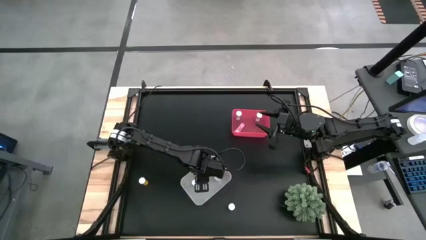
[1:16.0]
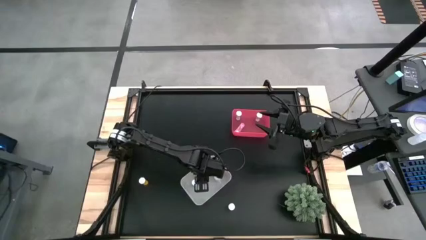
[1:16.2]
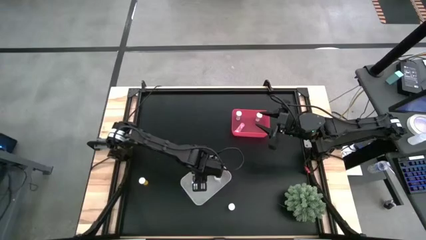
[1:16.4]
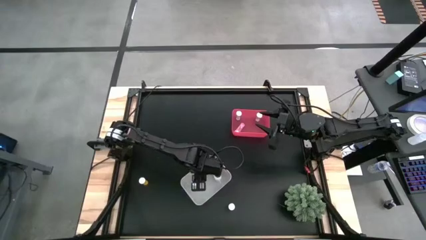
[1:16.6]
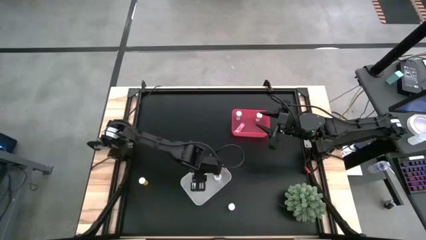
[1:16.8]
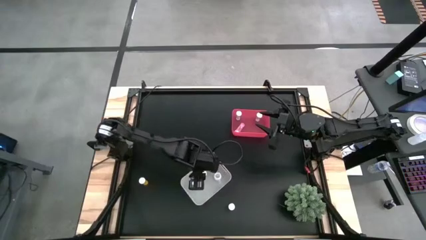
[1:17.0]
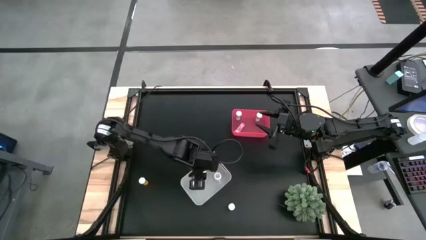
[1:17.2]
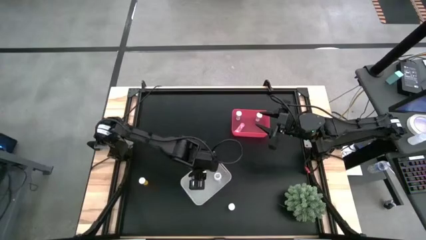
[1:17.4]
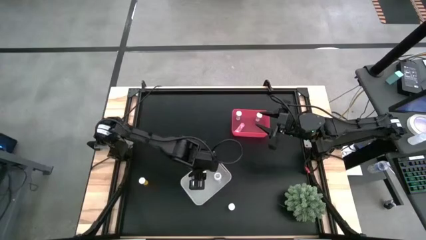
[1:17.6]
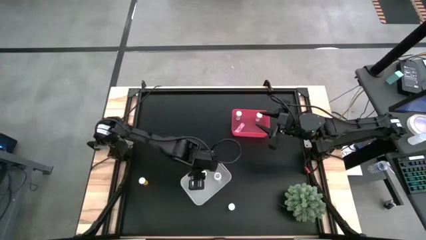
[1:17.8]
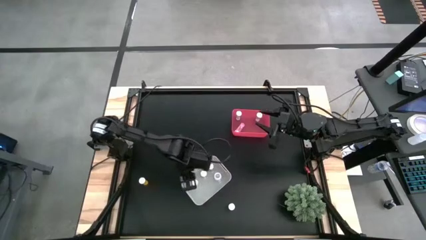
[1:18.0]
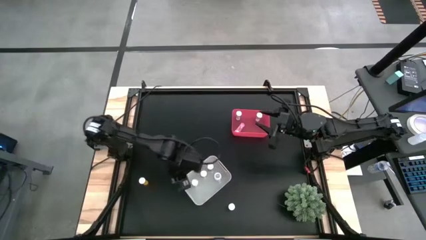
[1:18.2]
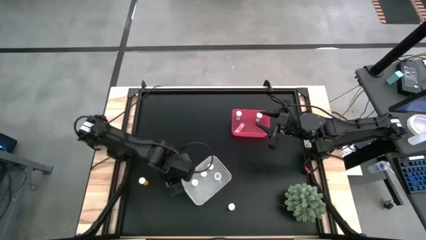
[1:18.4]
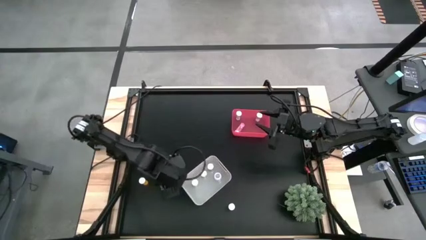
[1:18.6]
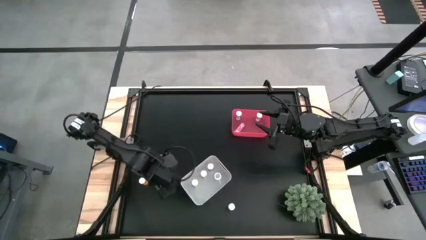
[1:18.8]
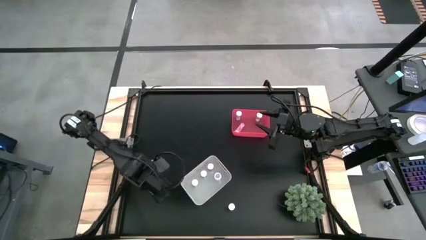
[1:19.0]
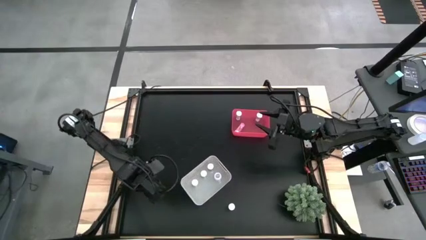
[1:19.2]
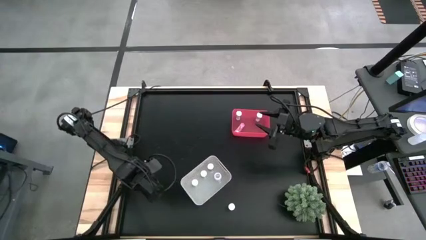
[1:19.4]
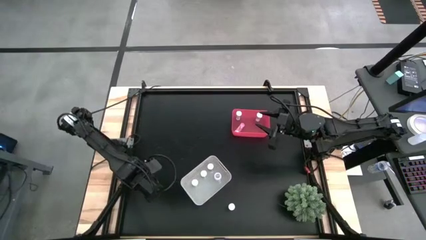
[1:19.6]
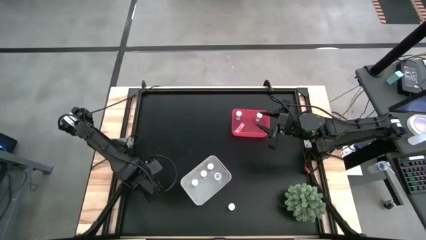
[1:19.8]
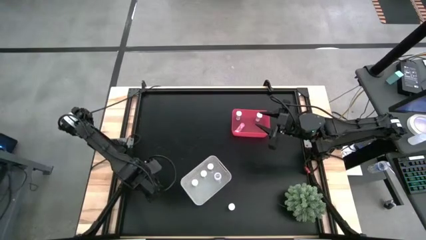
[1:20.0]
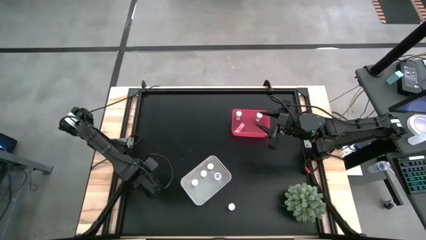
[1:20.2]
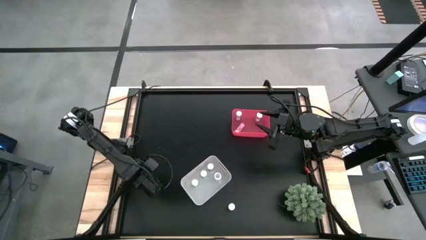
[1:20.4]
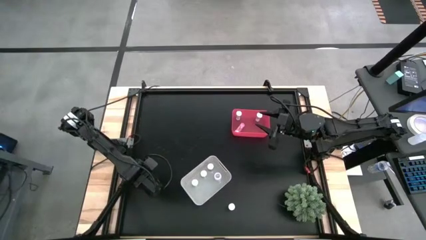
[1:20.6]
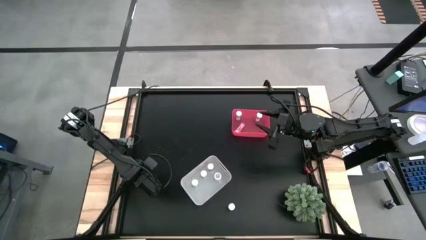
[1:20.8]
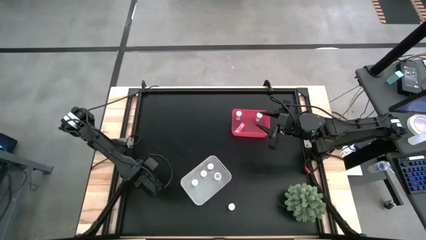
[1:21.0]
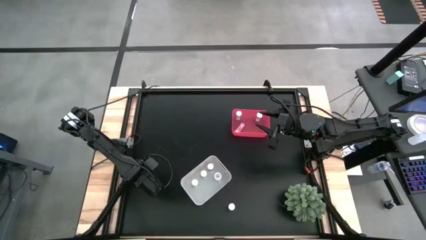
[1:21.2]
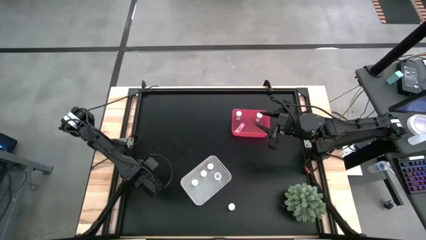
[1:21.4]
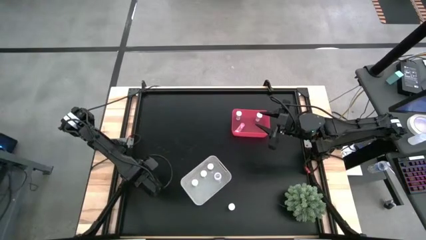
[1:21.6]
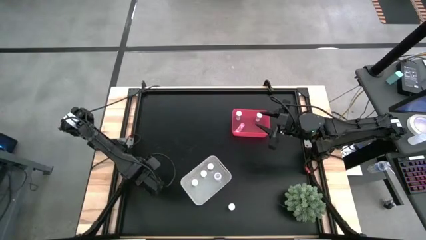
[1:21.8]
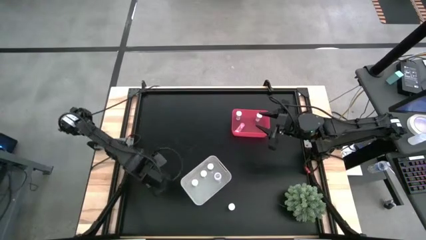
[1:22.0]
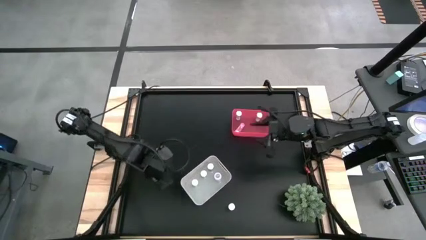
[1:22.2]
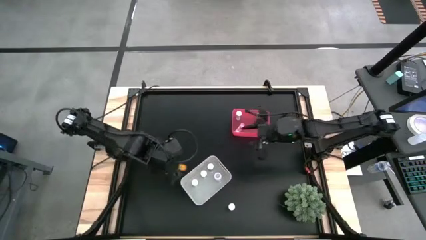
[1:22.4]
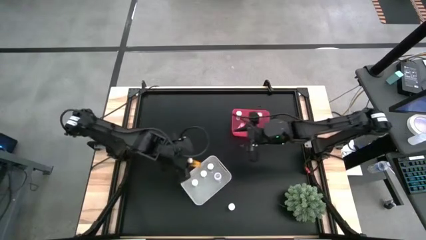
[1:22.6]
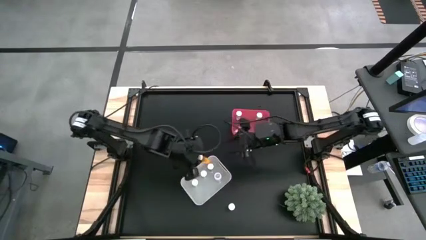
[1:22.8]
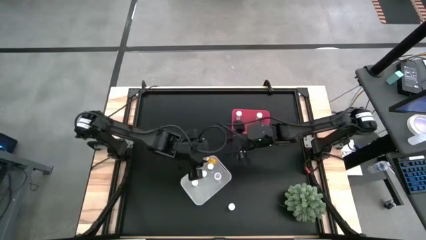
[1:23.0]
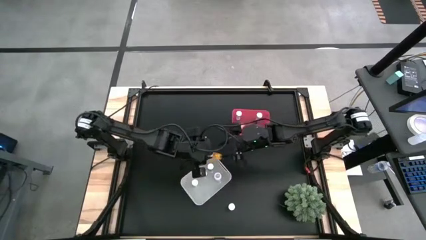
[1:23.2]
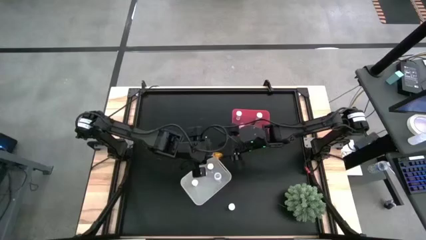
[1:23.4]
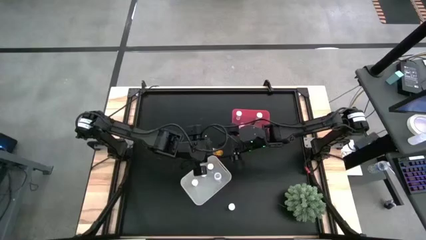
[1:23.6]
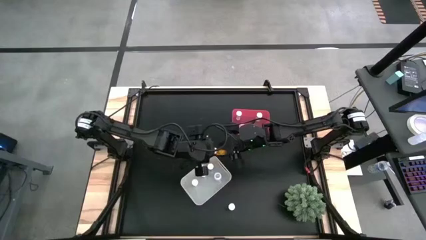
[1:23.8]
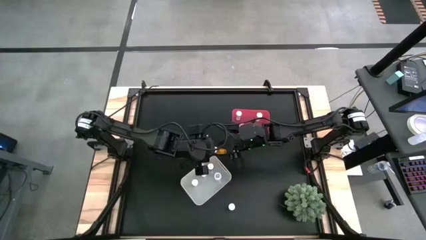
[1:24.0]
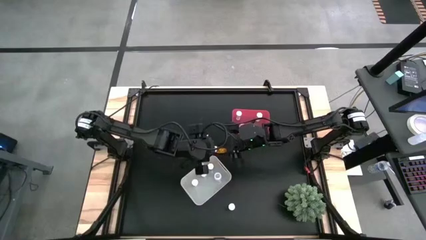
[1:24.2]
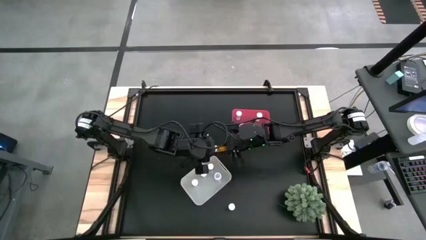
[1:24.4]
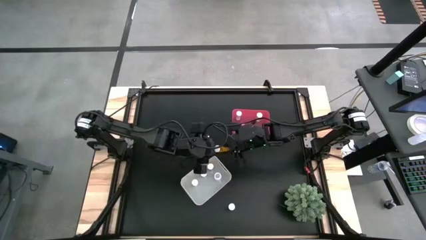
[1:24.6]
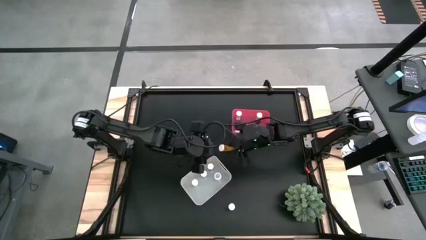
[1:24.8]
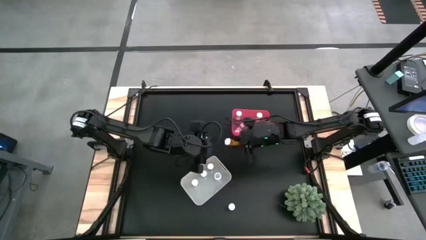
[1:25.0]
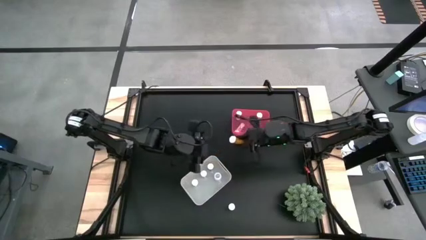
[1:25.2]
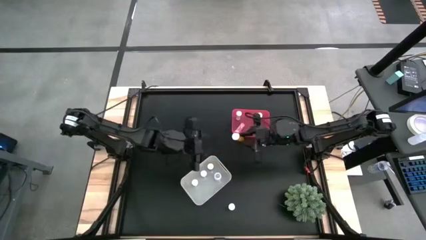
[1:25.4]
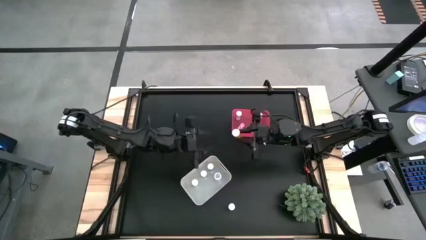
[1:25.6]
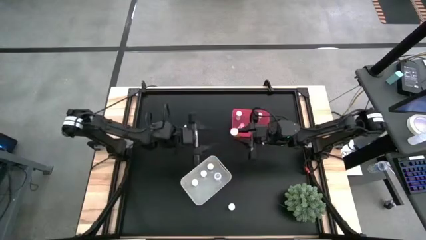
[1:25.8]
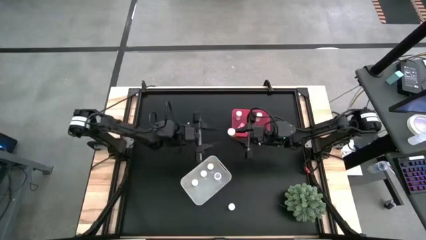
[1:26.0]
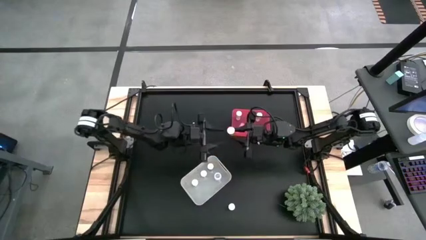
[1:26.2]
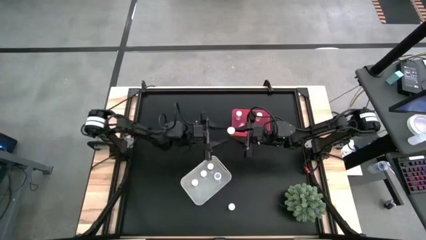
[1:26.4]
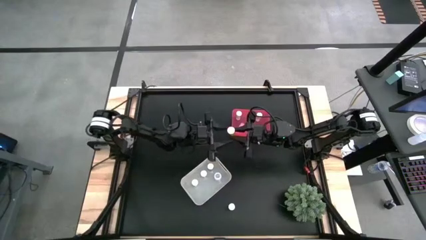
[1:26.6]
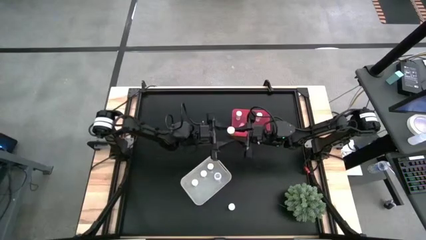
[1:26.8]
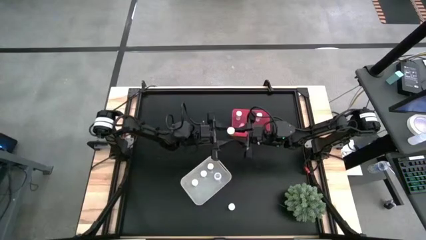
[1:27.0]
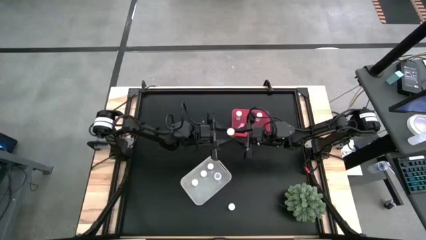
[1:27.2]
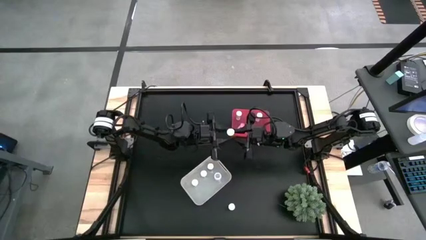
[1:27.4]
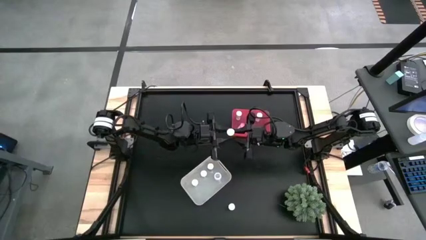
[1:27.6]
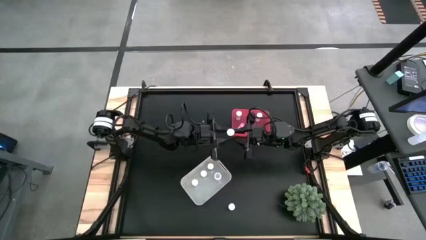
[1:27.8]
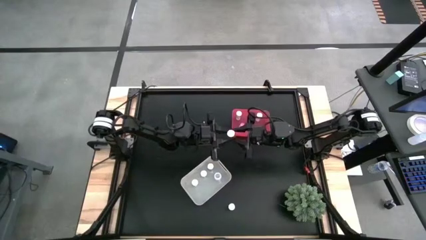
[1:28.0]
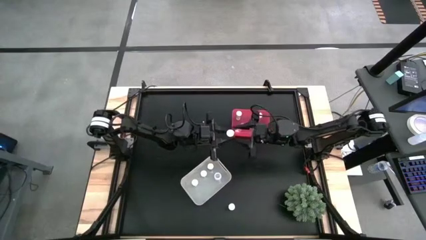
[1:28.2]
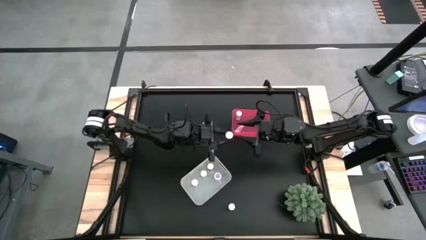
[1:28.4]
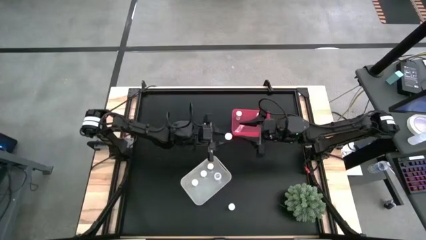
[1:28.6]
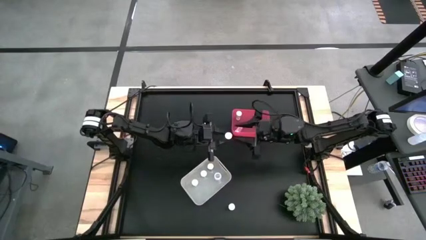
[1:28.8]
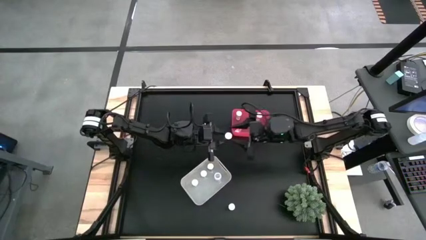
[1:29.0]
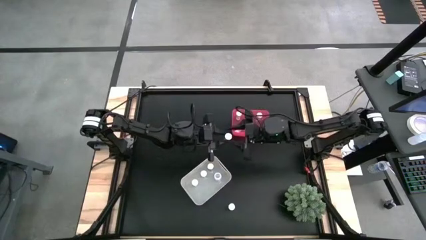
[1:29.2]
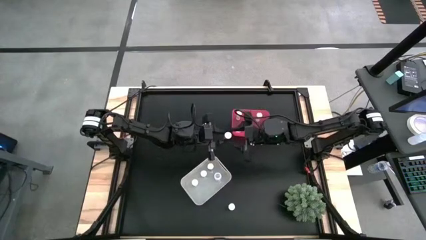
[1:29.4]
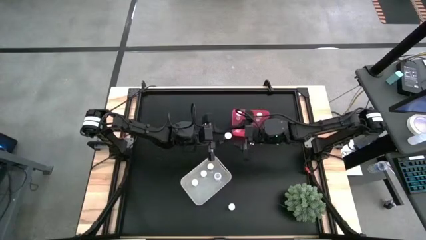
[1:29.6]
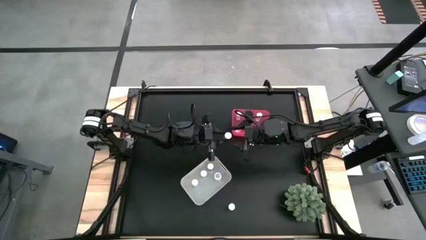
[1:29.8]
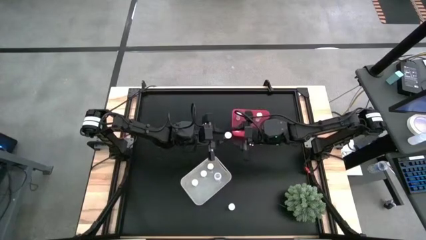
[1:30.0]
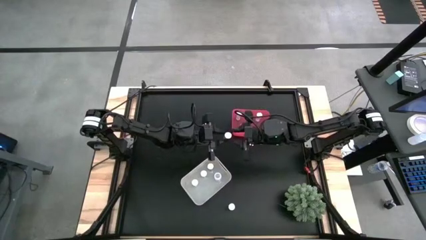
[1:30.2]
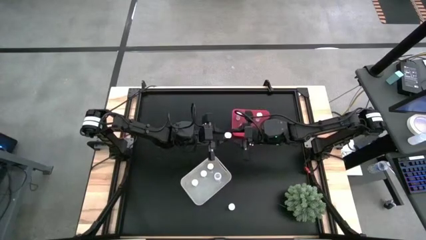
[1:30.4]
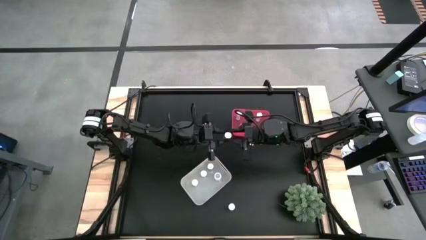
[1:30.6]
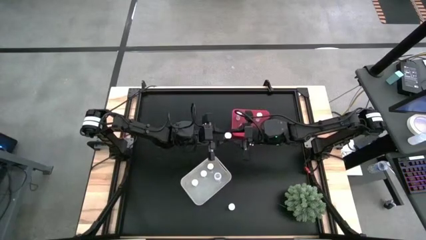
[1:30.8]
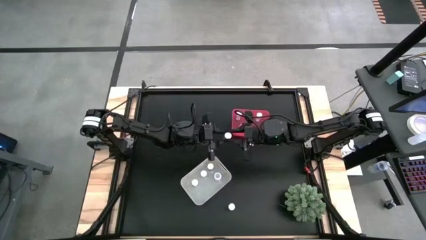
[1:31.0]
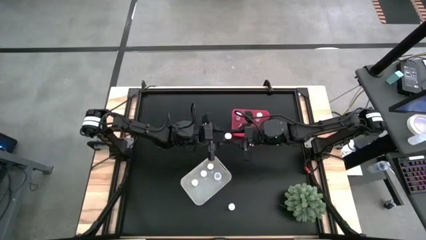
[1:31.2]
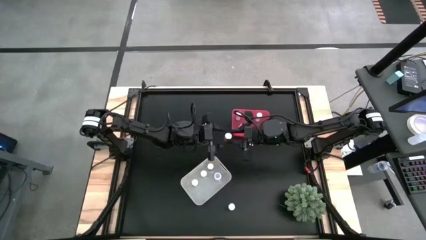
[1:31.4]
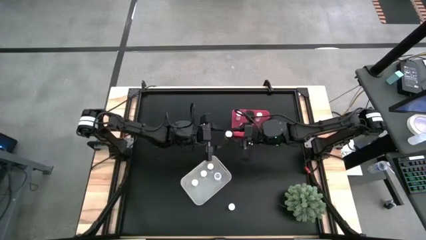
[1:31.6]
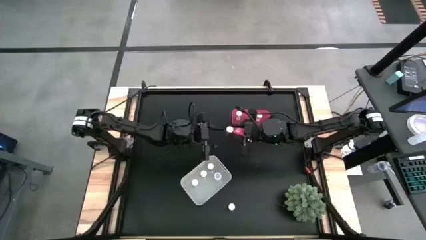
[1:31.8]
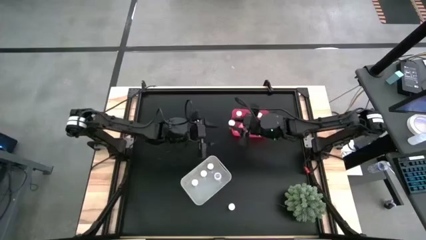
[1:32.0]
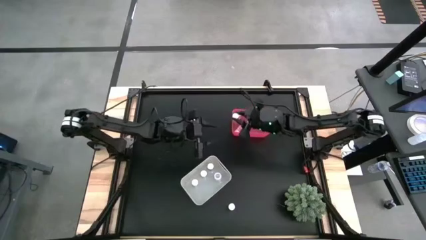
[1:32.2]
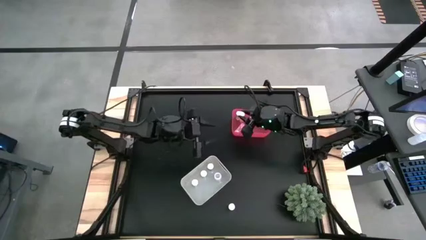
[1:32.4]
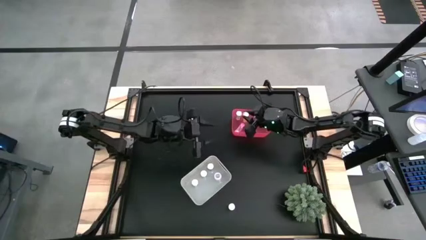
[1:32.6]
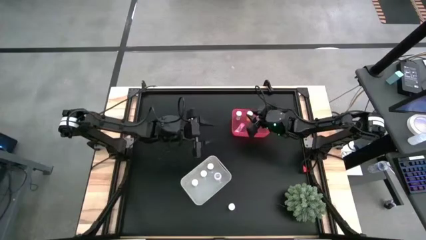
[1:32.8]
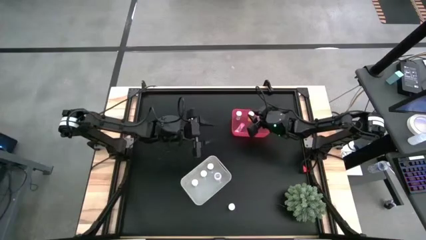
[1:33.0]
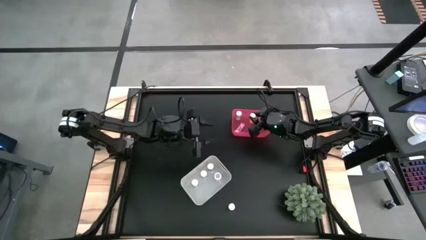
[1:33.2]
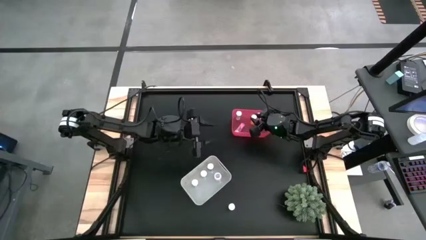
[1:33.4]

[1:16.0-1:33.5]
Task: Pick and place medicine bottles into bin by pill shape (circle, oval)
Put the yellow tablet bottle into the red bin
